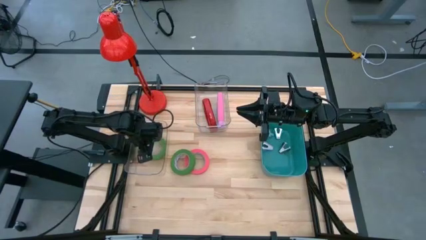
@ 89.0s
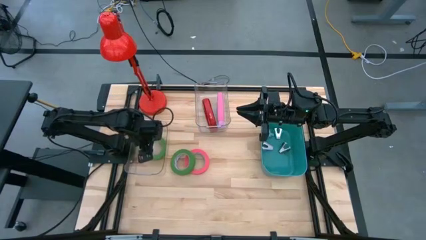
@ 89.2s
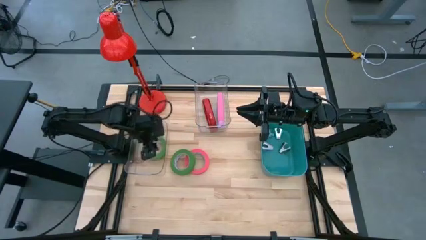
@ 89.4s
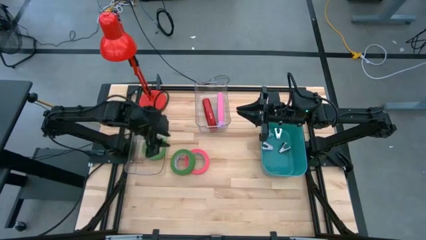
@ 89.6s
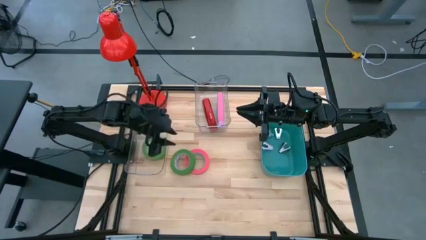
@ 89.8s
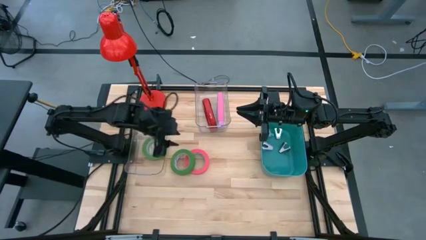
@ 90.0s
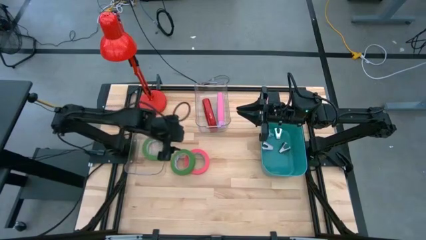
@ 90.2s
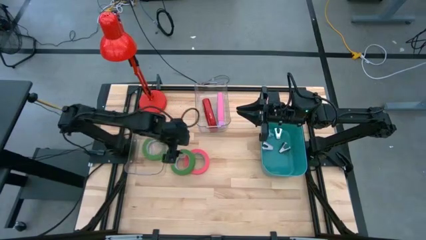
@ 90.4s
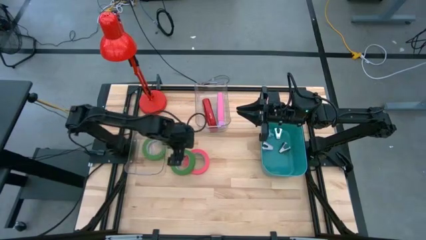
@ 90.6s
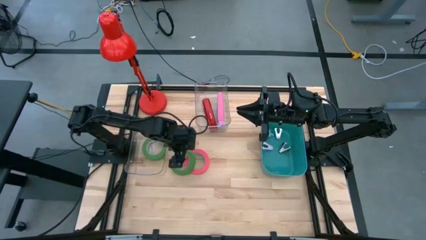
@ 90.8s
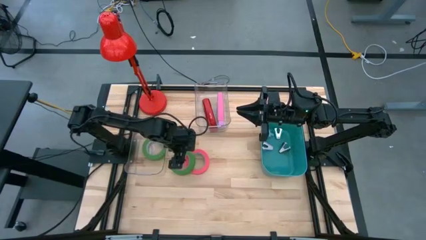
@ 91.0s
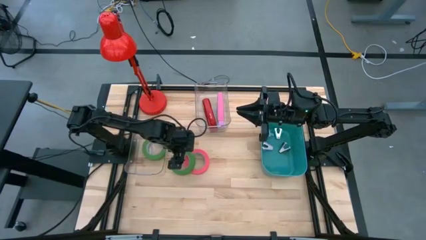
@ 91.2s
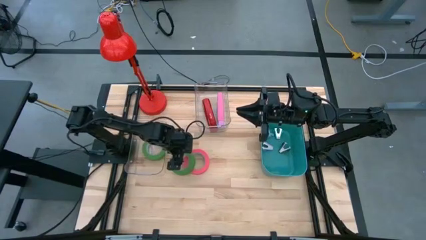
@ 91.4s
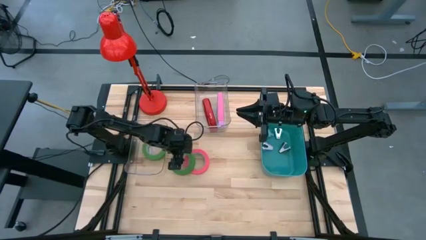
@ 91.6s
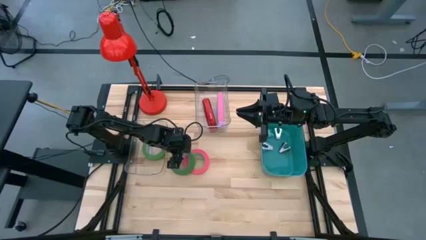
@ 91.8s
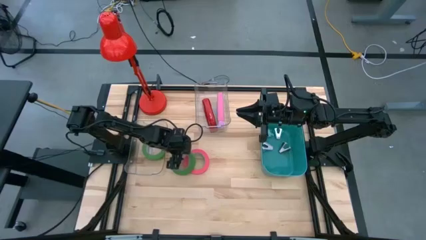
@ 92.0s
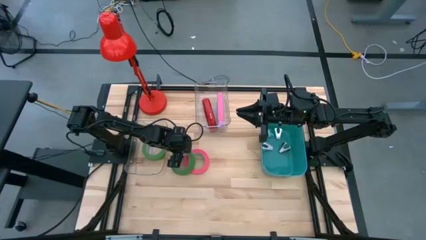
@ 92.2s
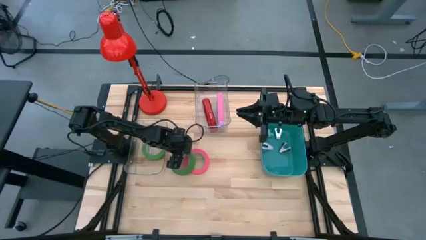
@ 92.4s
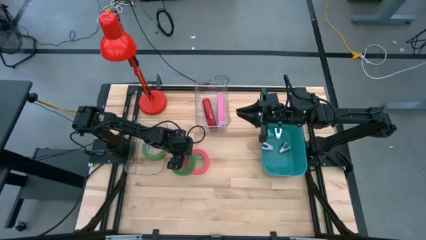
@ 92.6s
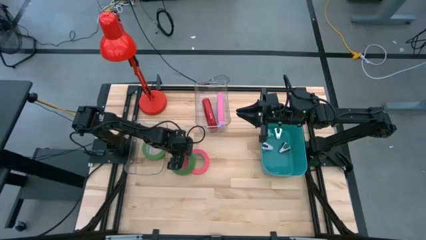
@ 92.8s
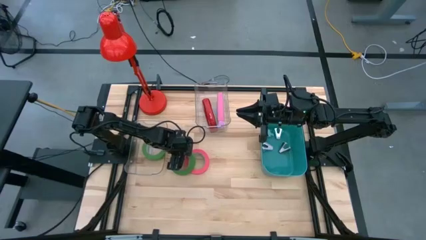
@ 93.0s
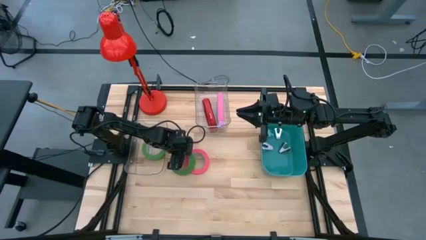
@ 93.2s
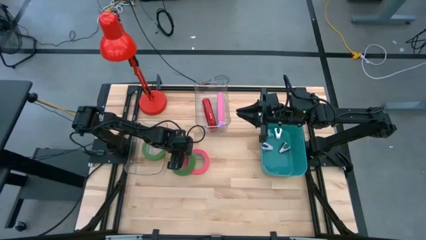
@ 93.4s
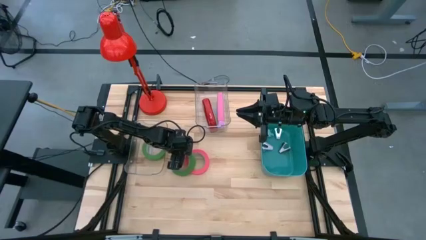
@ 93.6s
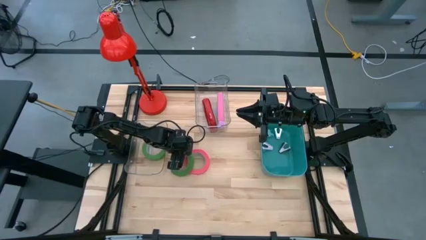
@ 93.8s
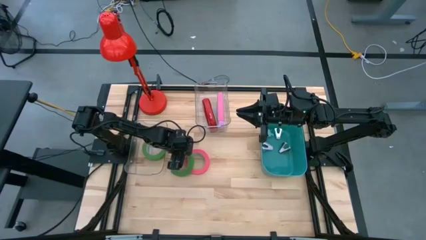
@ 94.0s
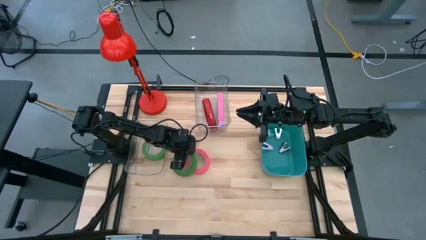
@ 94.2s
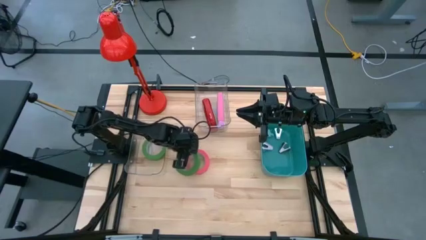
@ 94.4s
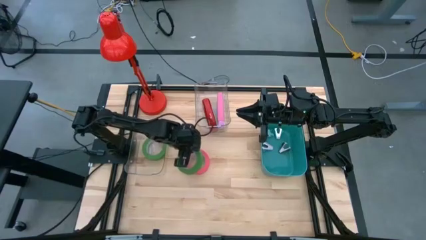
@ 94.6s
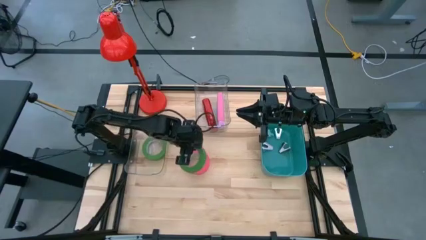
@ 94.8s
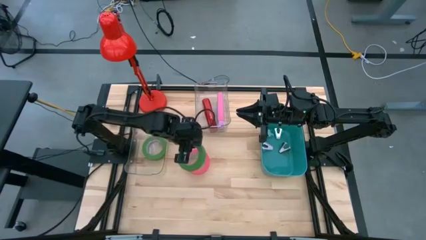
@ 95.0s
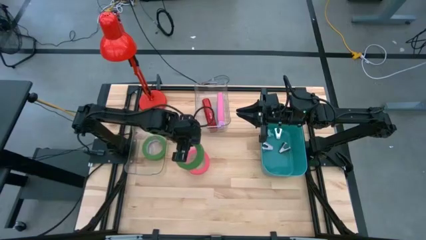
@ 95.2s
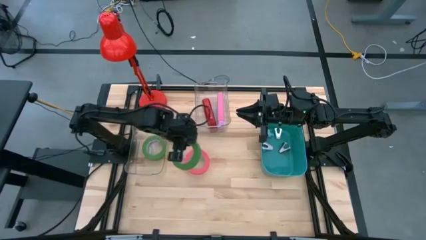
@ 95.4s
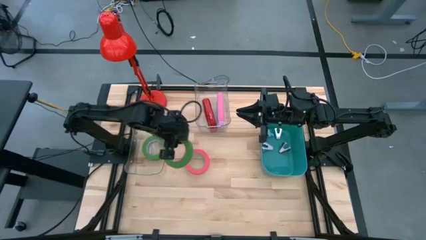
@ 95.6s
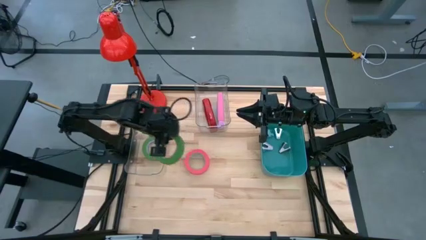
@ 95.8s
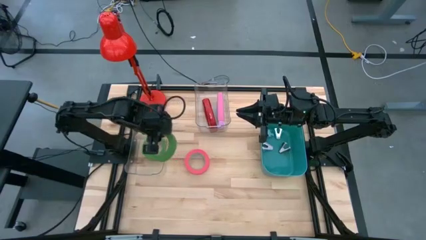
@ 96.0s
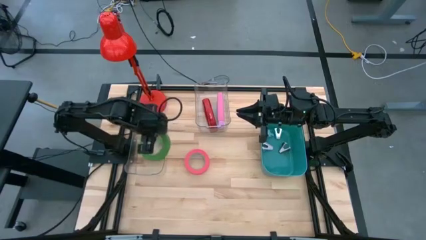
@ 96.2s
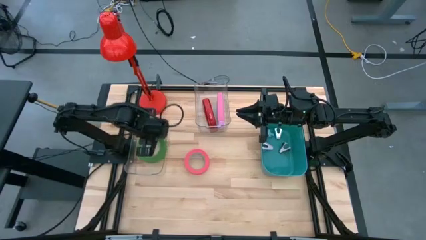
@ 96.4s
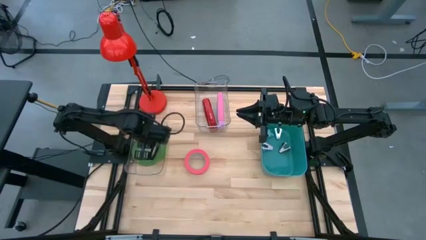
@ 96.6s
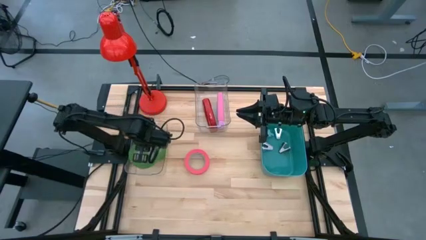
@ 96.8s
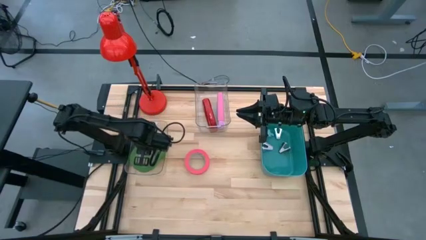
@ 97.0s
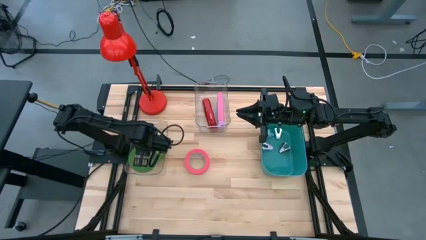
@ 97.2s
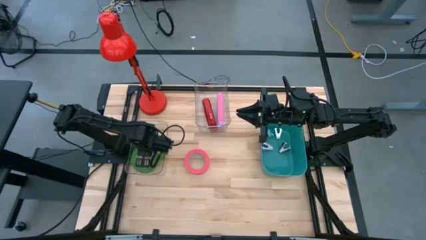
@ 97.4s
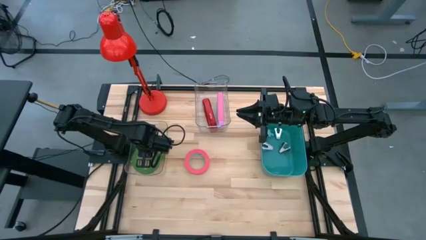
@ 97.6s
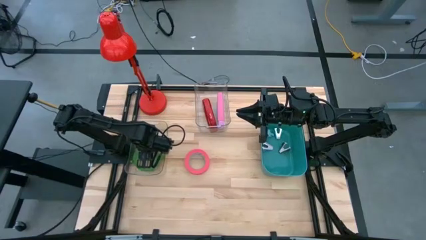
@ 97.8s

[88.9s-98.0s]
Task: Pick and place Stapler, Stapler remover, tape
Put the green tape into the left transparent bin

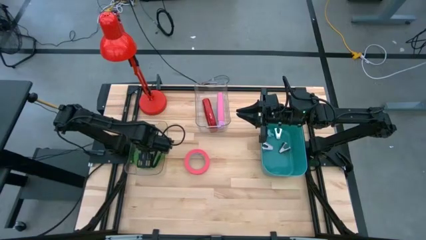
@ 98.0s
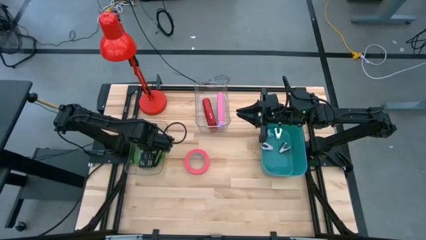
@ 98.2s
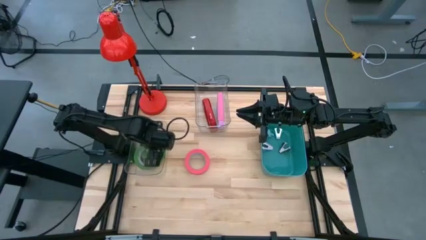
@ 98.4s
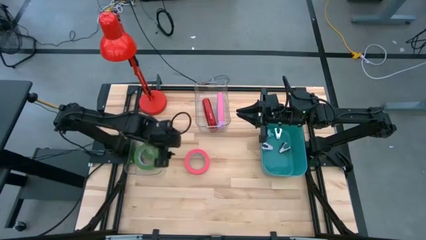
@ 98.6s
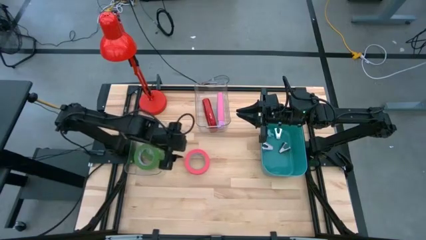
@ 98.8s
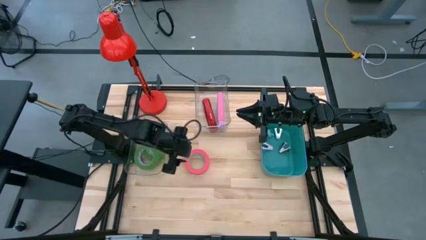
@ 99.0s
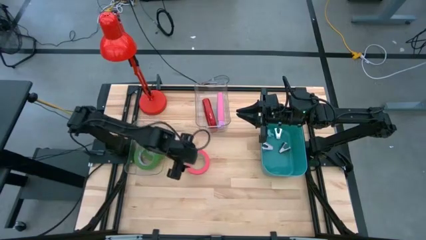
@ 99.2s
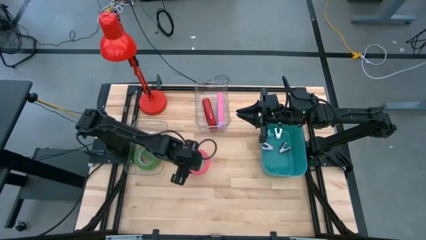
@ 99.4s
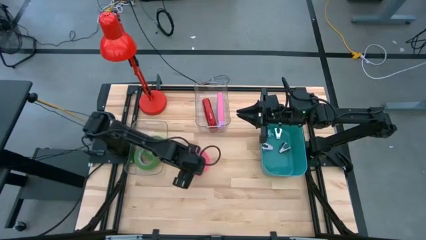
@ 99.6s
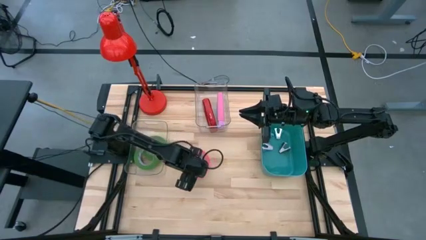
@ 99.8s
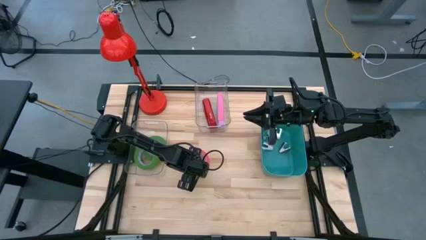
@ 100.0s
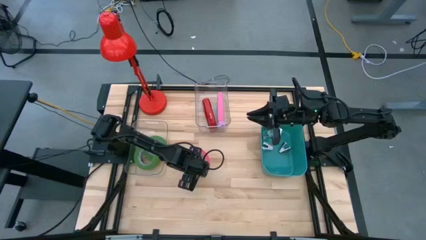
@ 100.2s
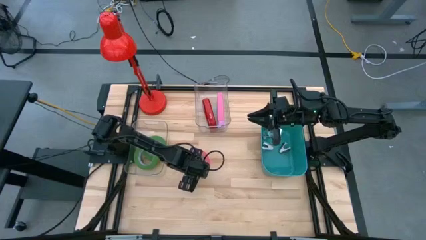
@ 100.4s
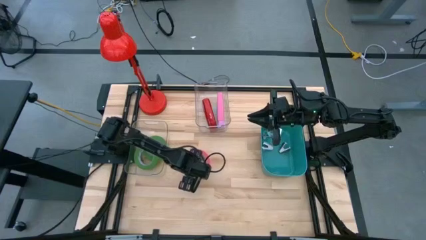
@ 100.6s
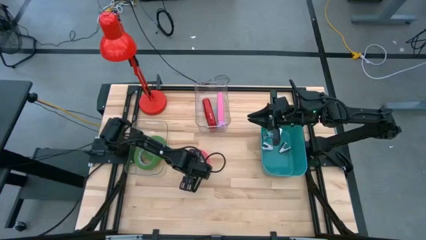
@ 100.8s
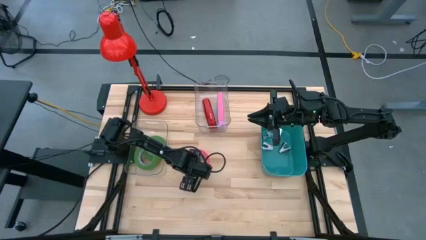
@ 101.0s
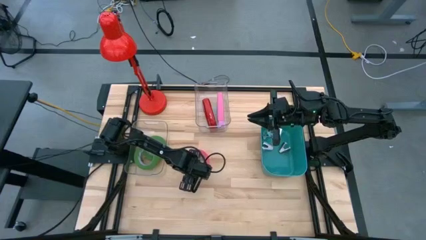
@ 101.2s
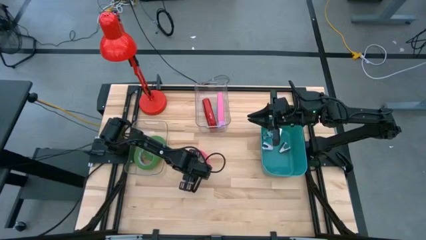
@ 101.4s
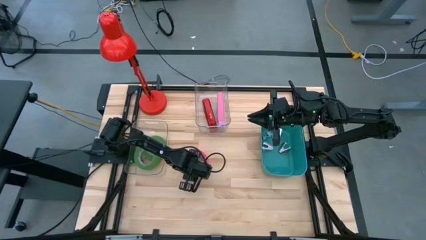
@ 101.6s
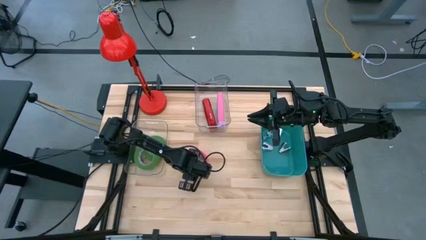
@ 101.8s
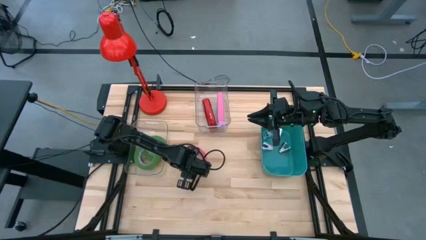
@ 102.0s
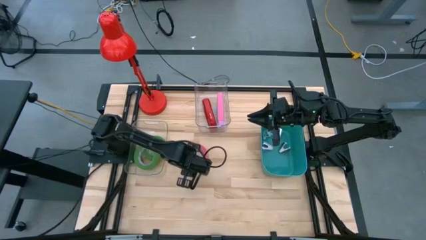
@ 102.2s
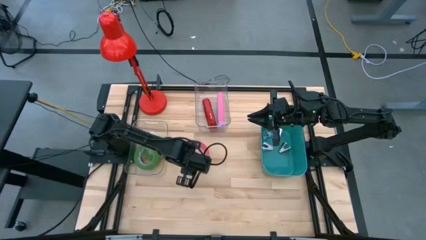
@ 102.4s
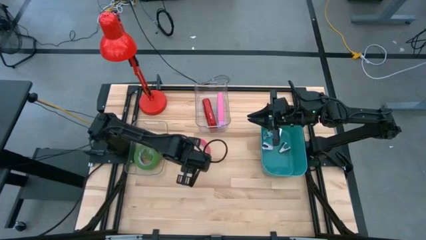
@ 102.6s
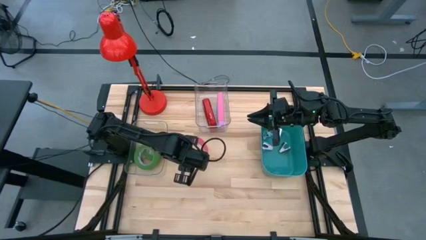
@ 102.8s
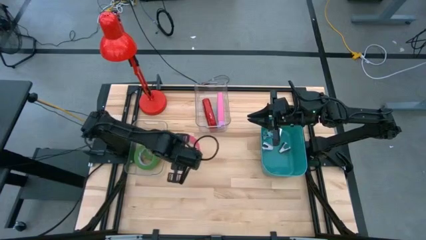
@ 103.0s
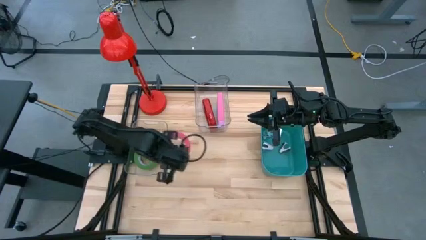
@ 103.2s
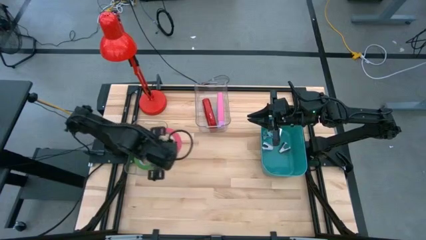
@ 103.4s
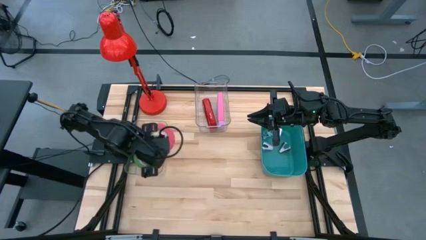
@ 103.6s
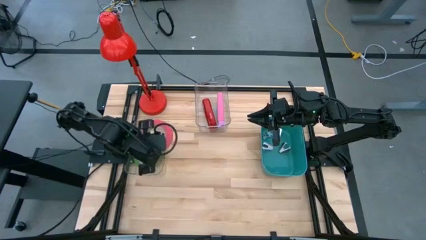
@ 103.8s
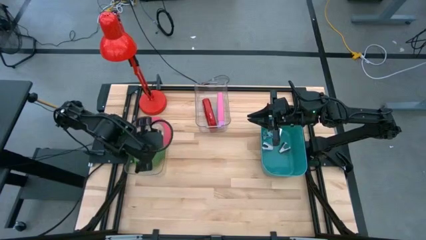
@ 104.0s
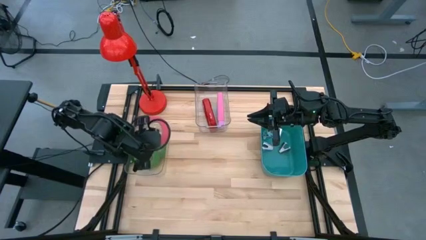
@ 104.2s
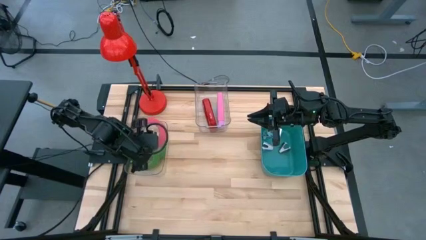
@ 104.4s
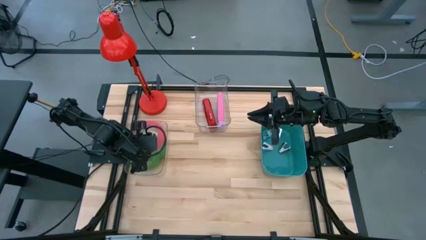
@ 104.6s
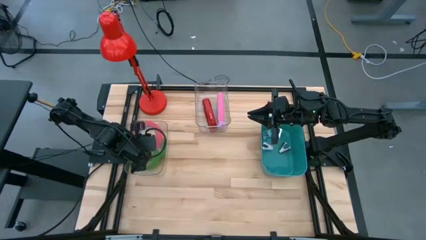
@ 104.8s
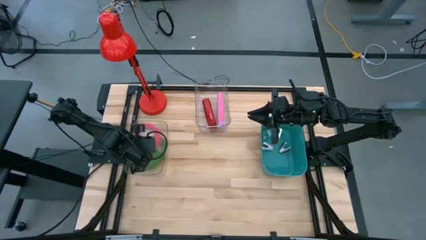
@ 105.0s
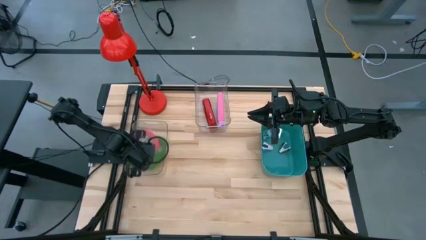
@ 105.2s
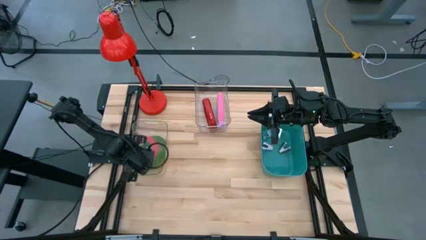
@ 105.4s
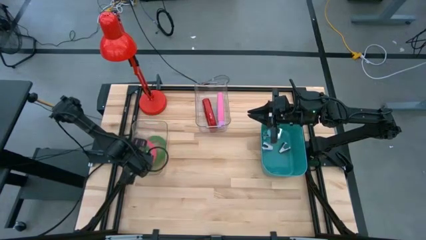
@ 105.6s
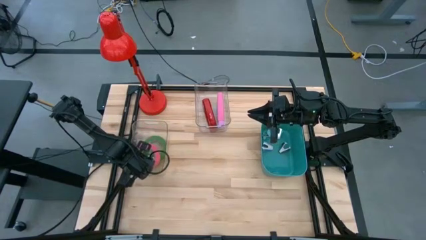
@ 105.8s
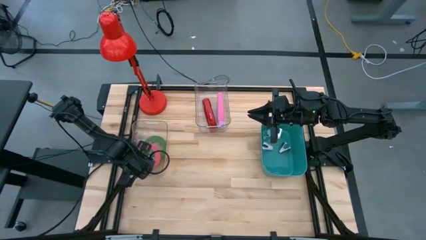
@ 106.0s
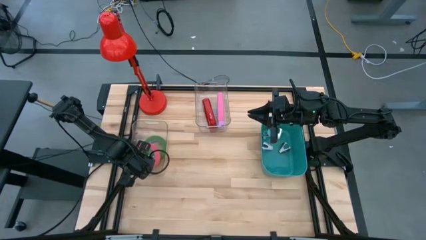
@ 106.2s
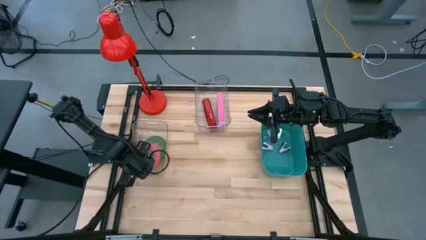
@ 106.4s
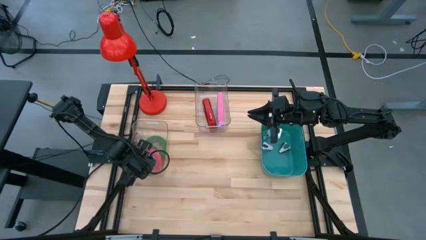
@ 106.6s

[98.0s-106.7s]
Put the pink tape into the left transparent bin
